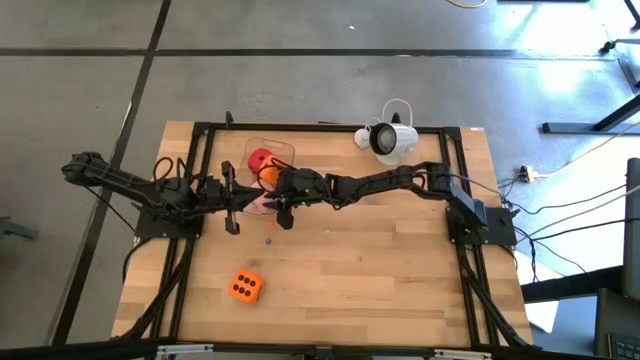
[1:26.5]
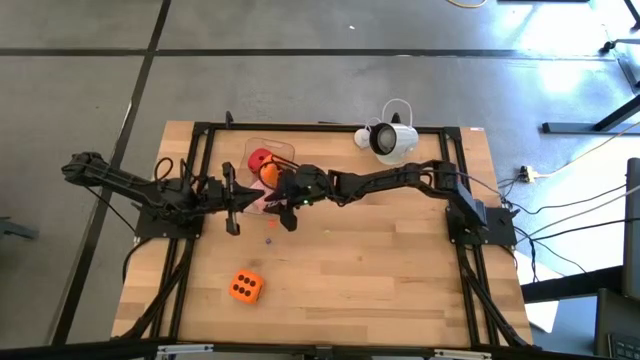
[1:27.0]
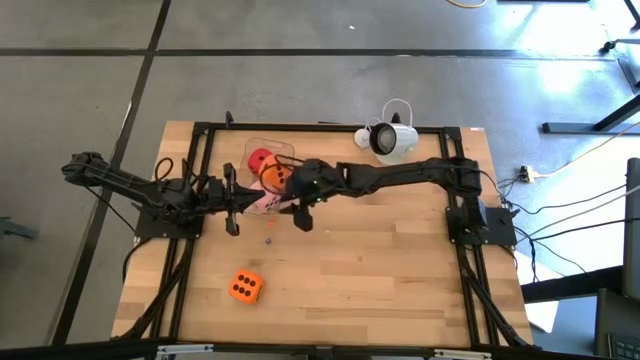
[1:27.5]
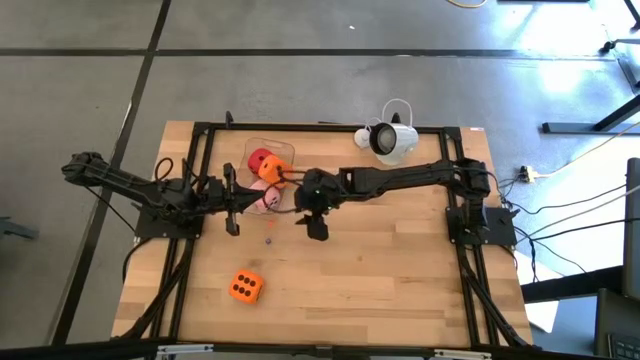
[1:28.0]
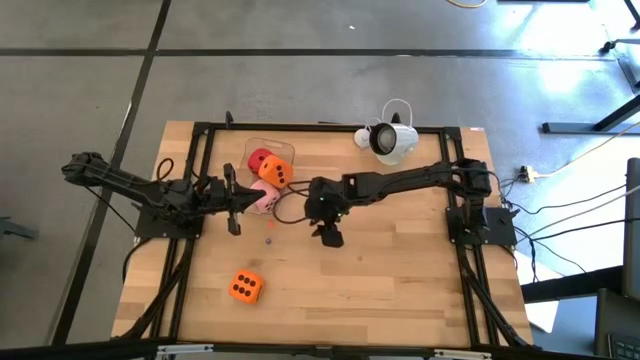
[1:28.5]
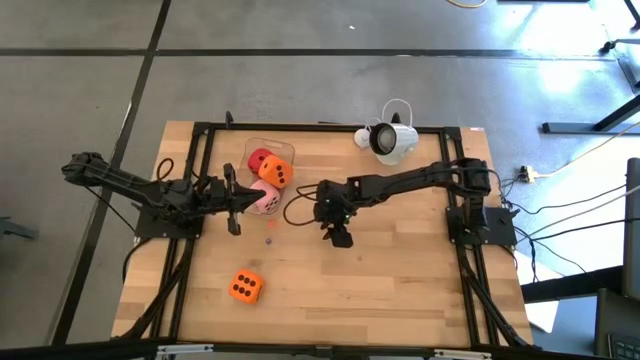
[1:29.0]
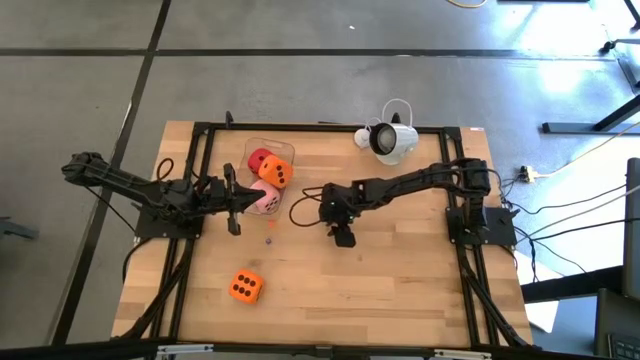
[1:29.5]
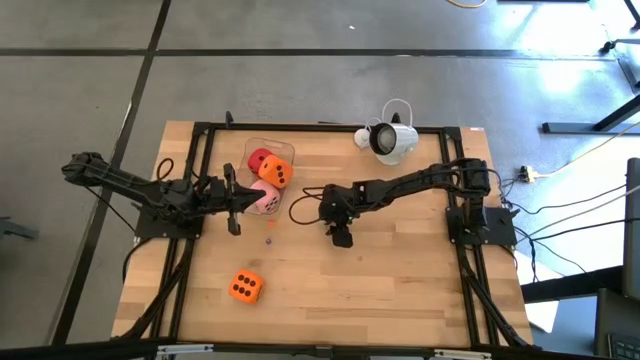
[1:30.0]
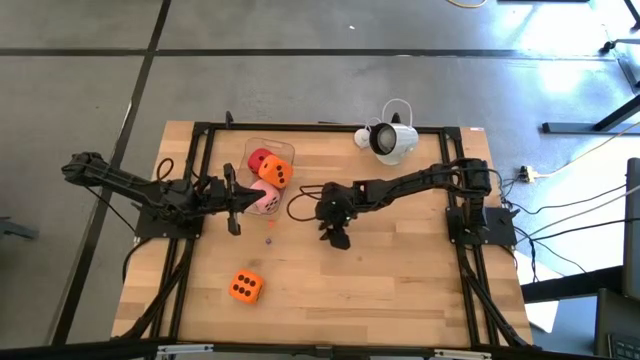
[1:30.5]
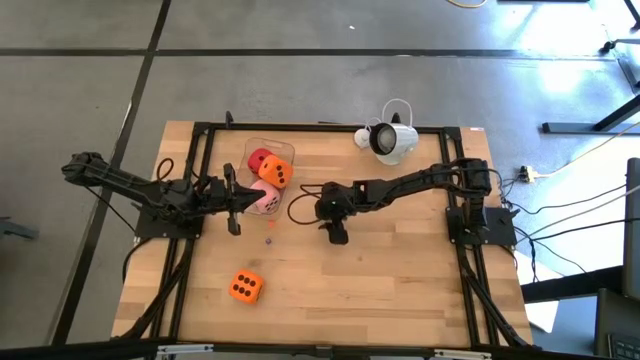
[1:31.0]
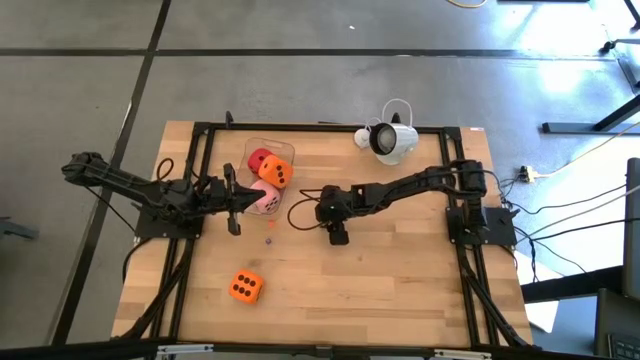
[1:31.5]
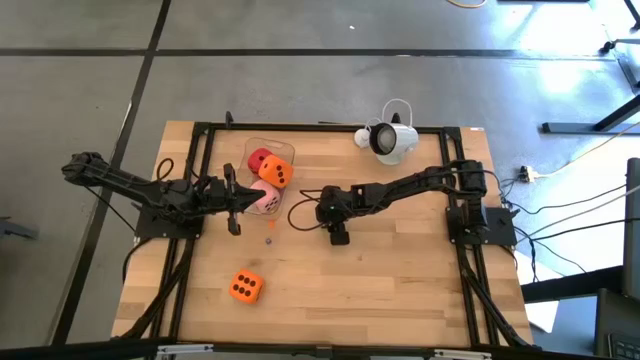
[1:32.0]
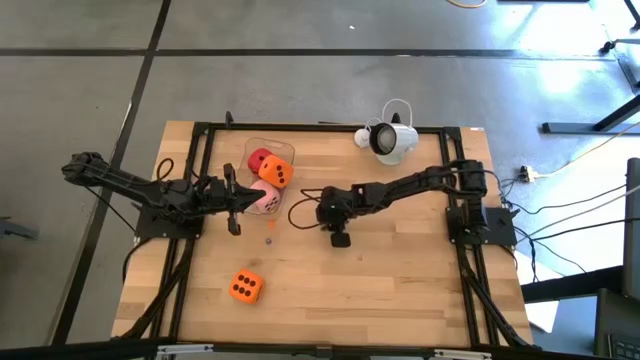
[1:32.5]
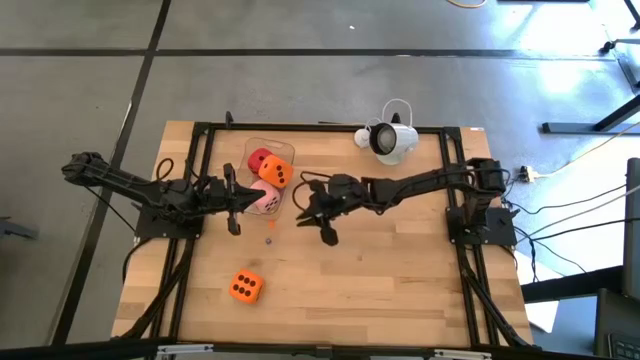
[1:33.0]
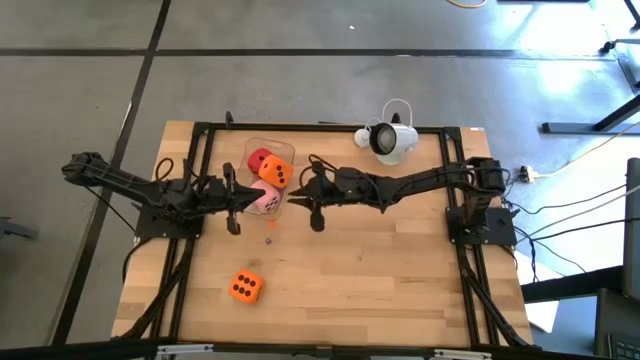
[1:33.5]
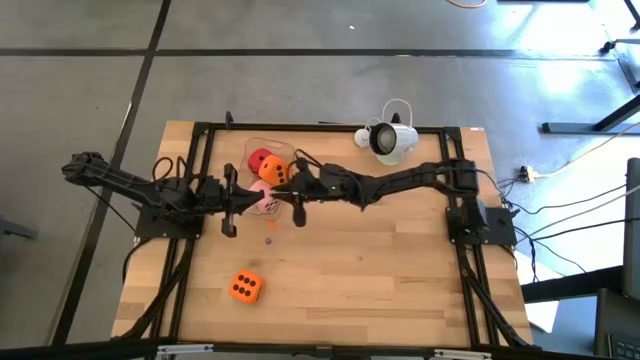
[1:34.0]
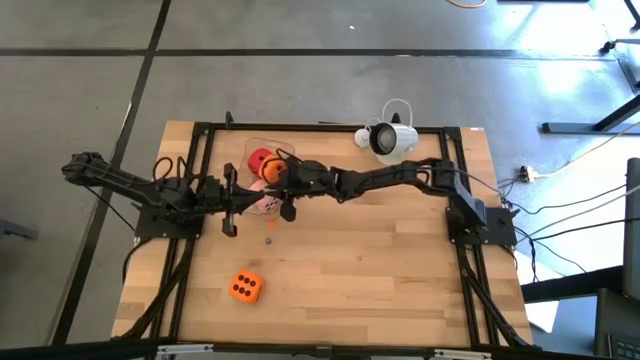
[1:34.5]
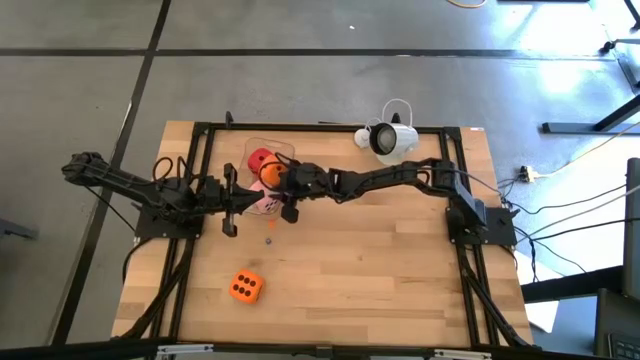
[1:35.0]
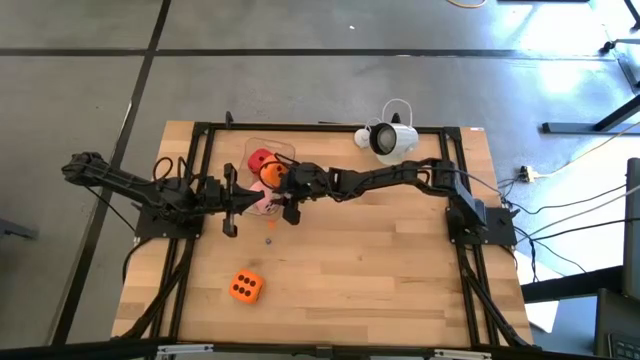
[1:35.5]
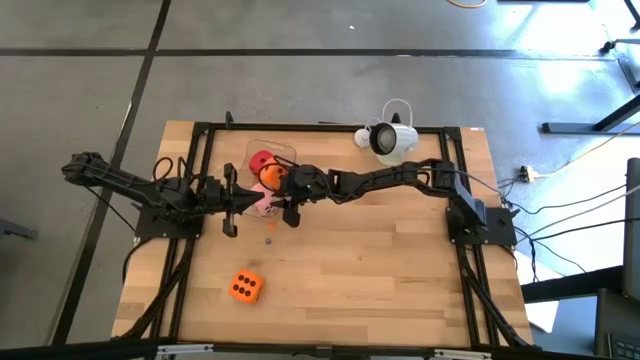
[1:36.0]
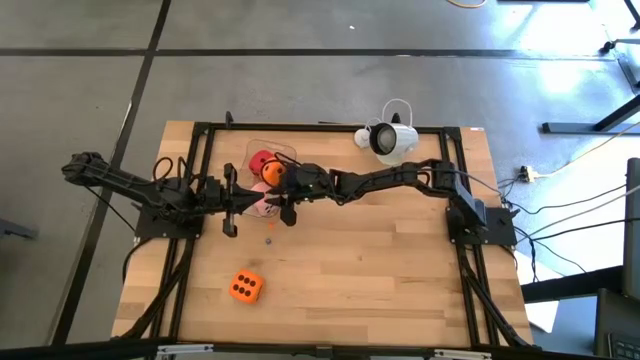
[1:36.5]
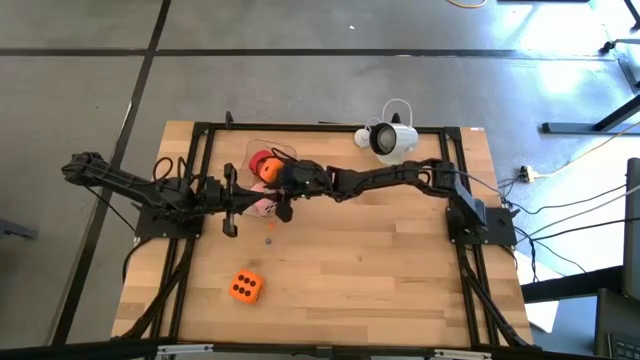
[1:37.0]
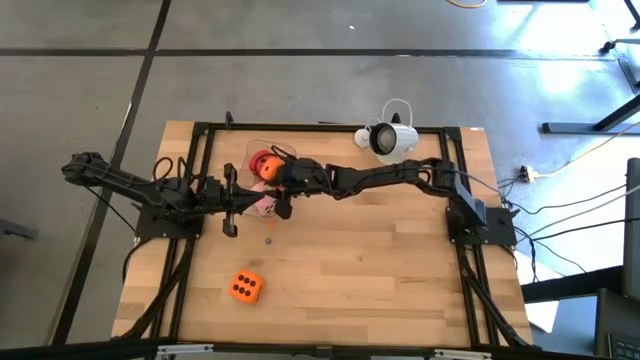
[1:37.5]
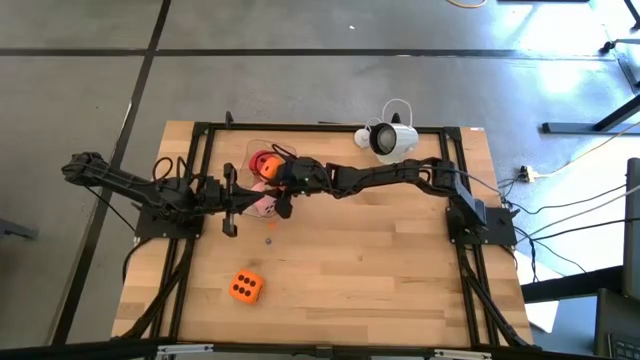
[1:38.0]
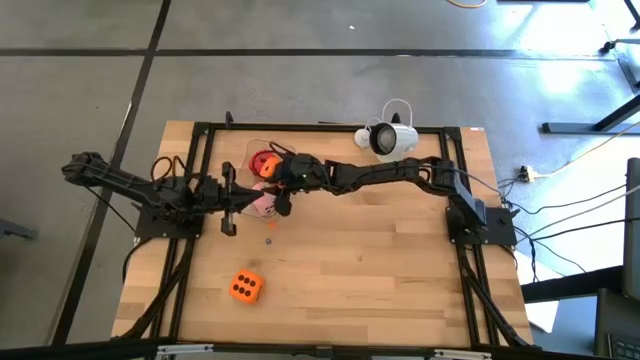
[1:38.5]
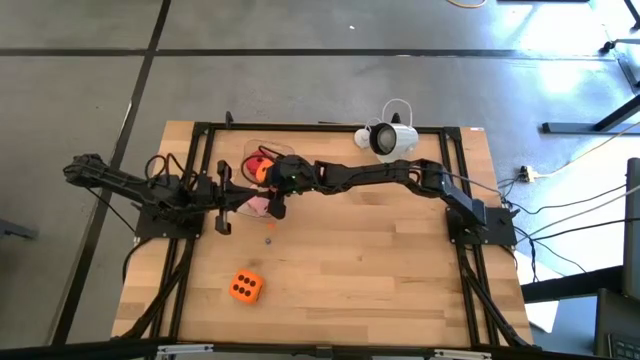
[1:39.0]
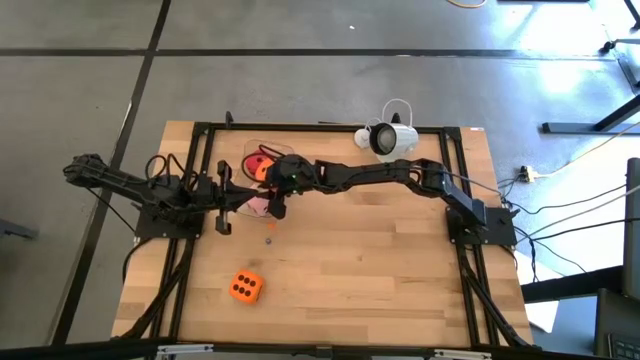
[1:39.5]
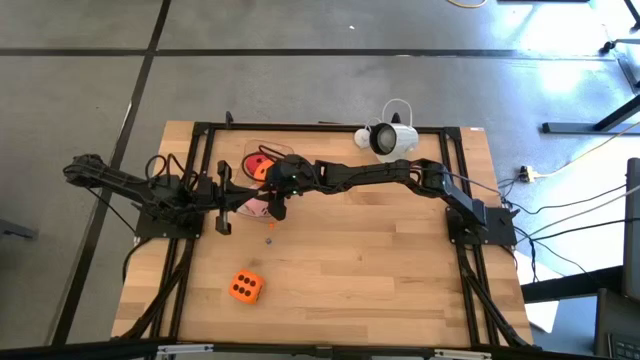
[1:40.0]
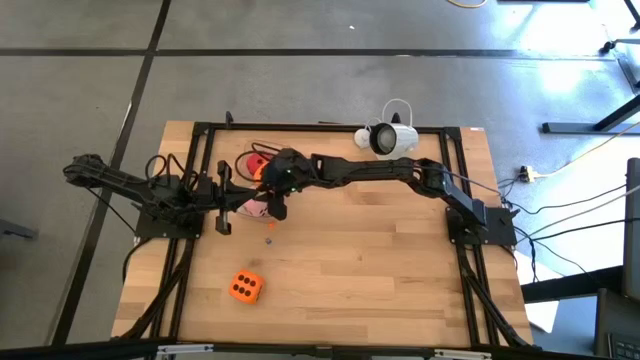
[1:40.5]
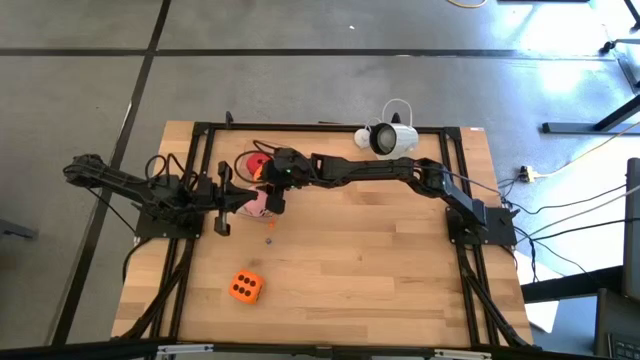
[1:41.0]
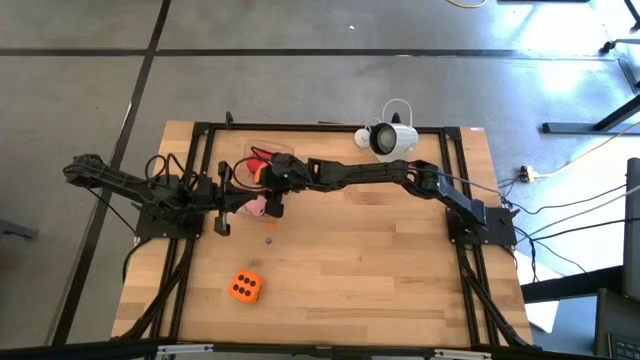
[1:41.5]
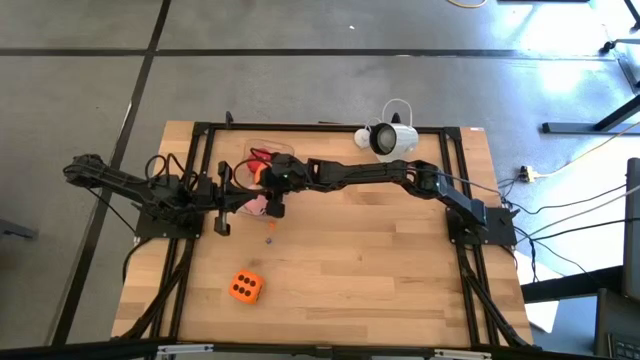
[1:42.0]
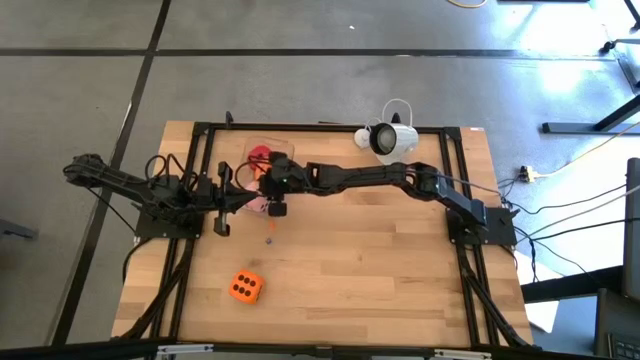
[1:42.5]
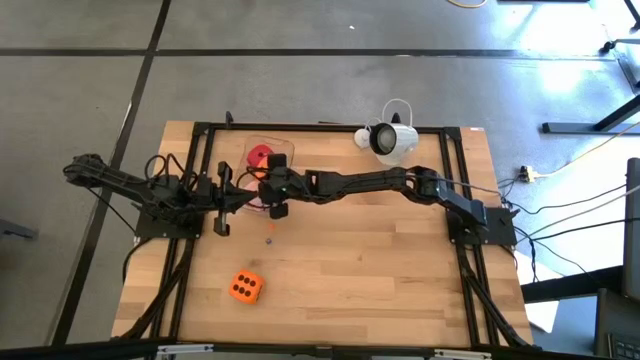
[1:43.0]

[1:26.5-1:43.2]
Task: Pick & Place Dice
Put the small green die into the transparent bin

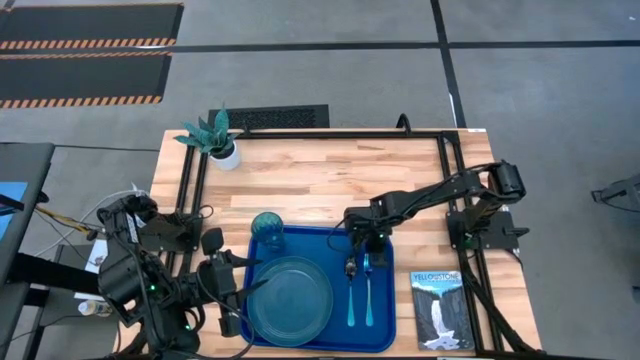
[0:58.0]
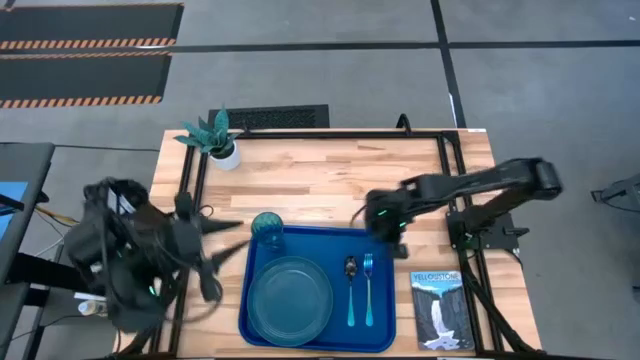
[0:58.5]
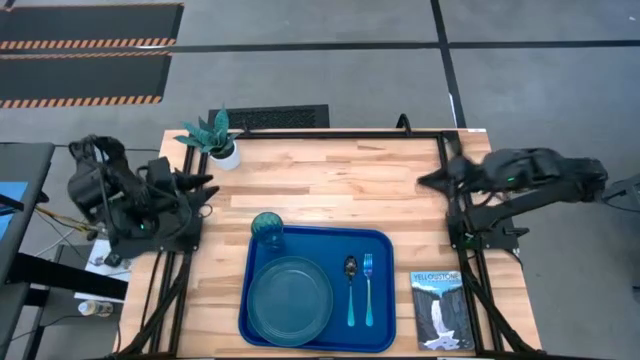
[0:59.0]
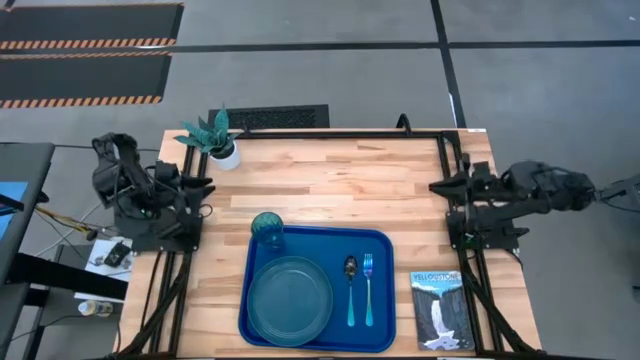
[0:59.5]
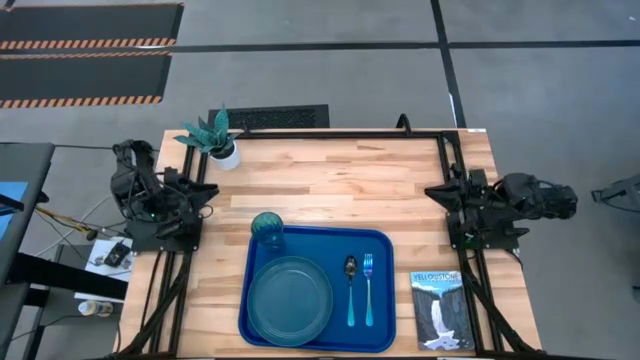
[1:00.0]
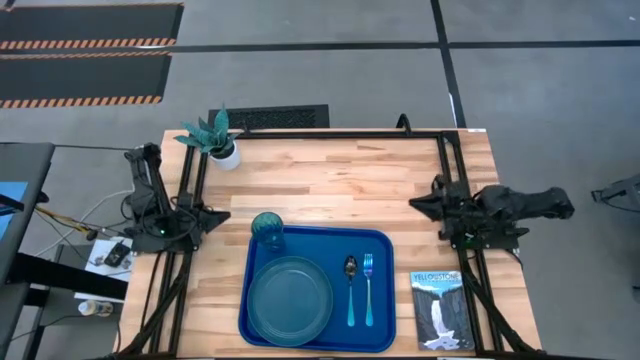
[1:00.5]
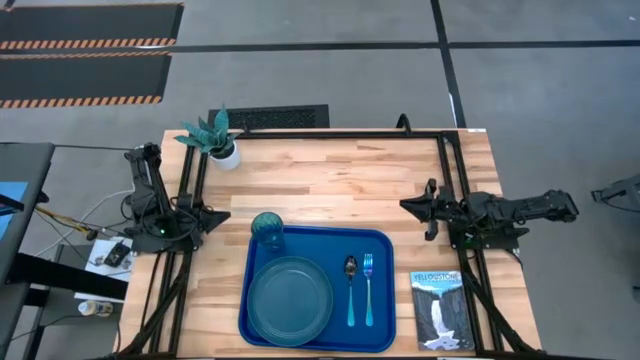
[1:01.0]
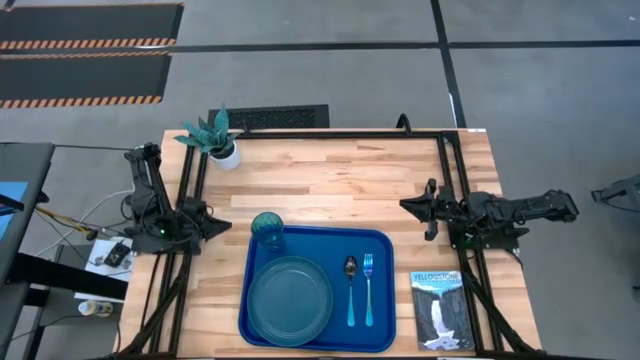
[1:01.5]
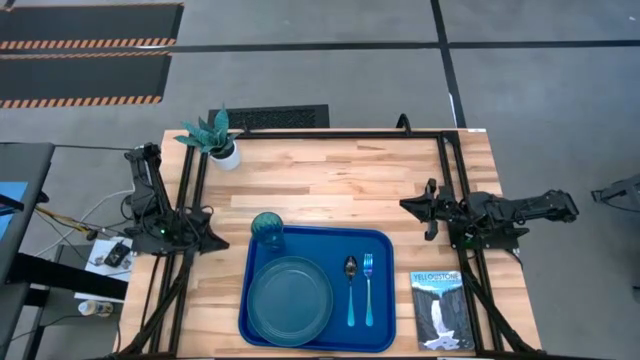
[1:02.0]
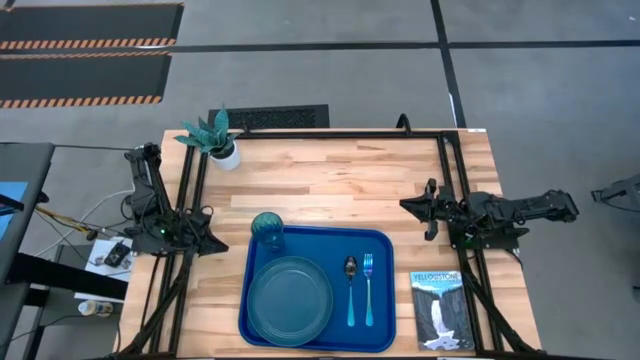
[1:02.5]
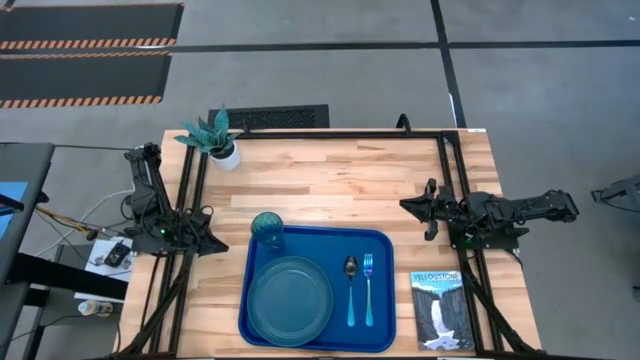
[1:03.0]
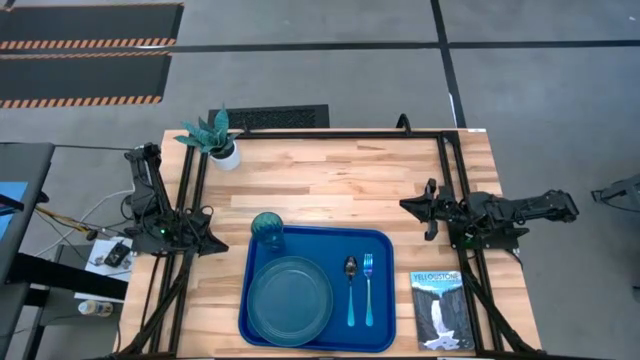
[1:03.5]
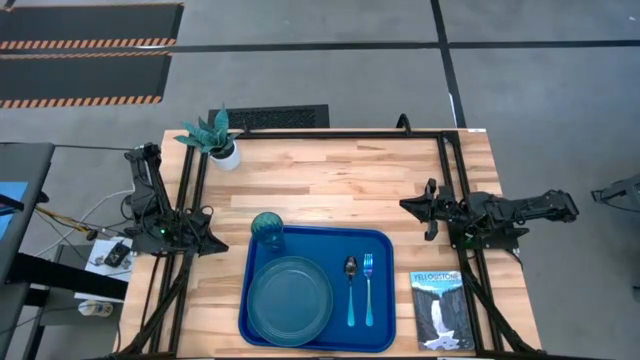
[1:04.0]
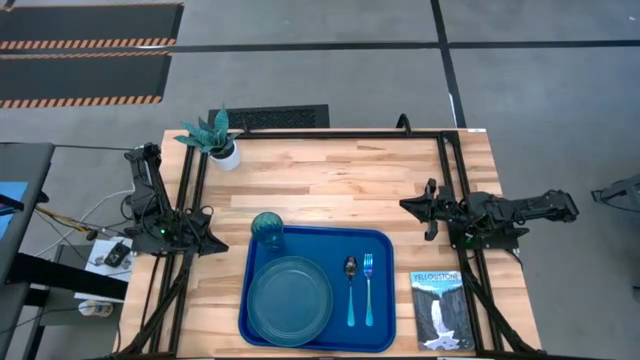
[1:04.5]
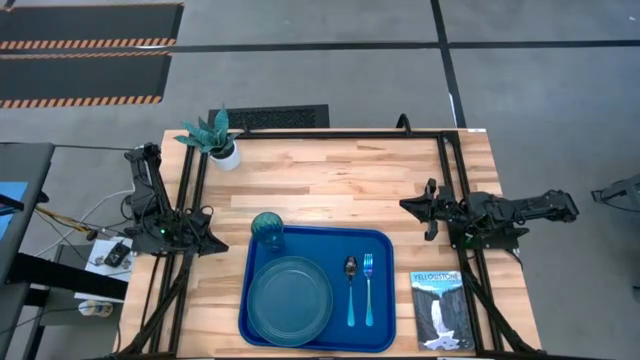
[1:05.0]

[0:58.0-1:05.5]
Task: Pick and place plate/cup/fork/spoon on tray
Return to Home Position
